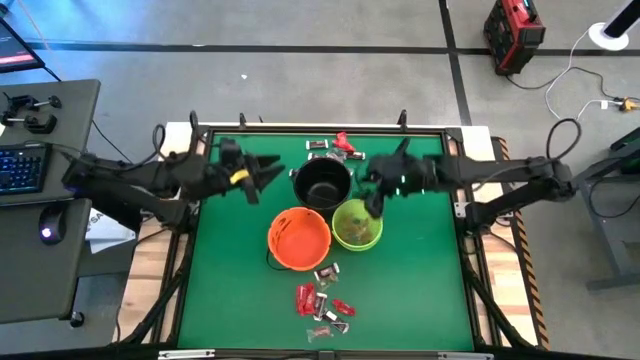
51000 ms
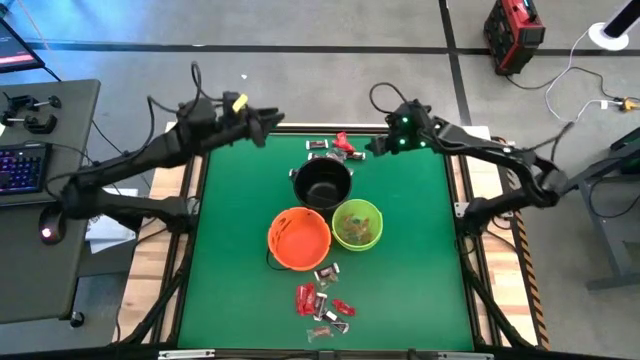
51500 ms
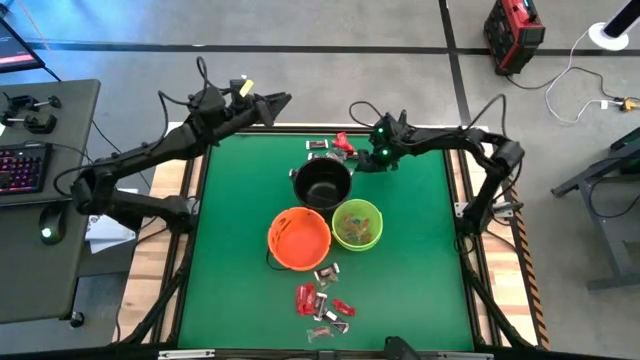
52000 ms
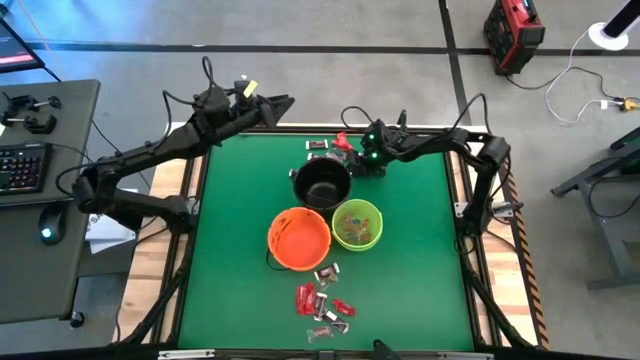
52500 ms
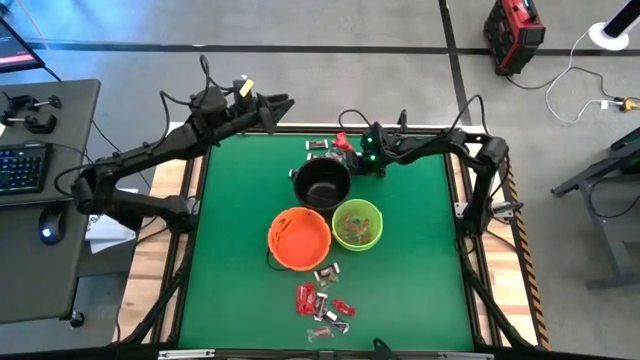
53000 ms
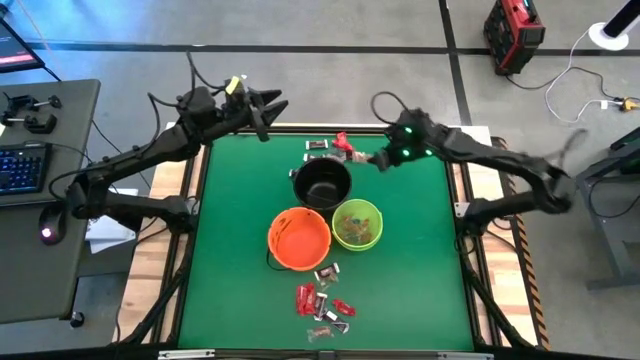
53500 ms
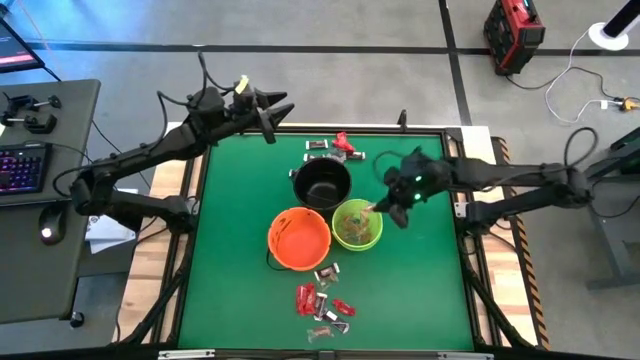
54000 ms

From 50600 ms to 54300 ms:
Task: Sort candy by brand, put in halloween buckets
Put the orange gummy into the green bucket

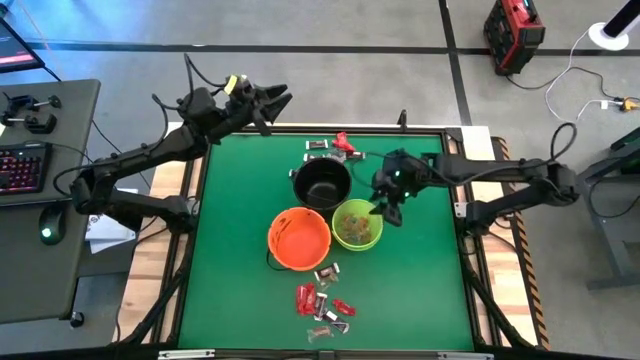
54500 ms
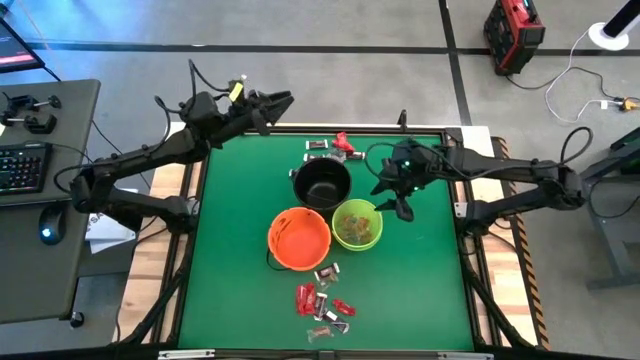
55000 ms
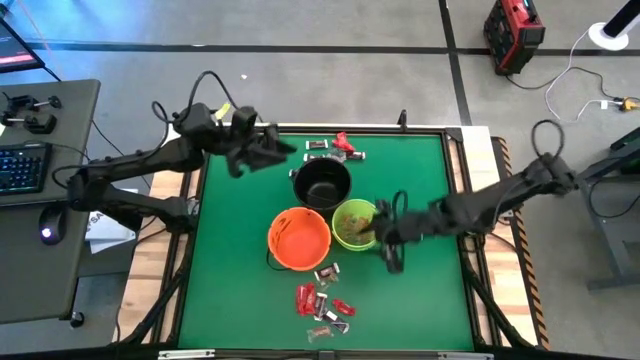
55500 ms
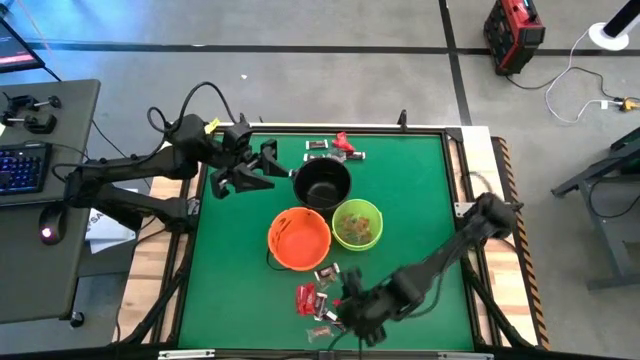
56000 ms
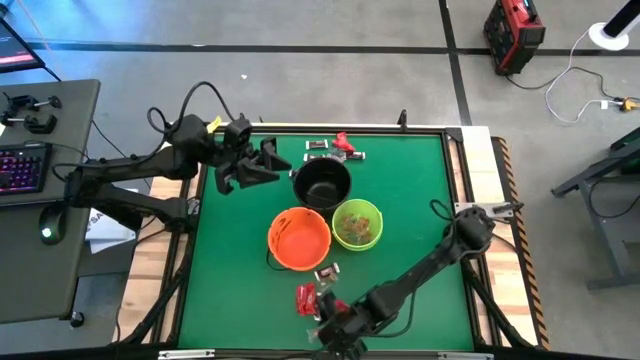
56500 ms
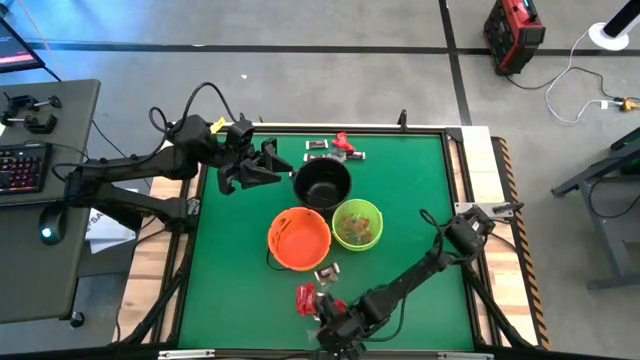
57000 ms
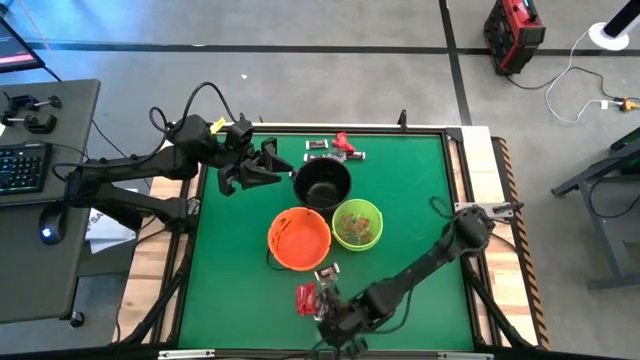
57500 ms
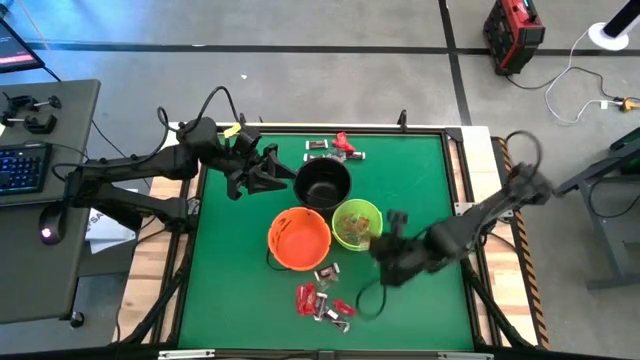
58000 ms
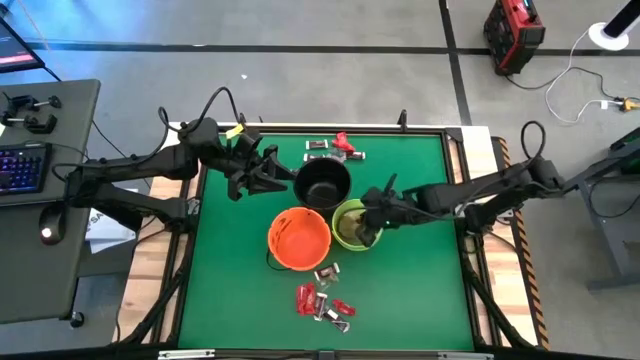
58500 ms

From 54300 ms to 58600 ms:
Put the orange gummy into the green bucket

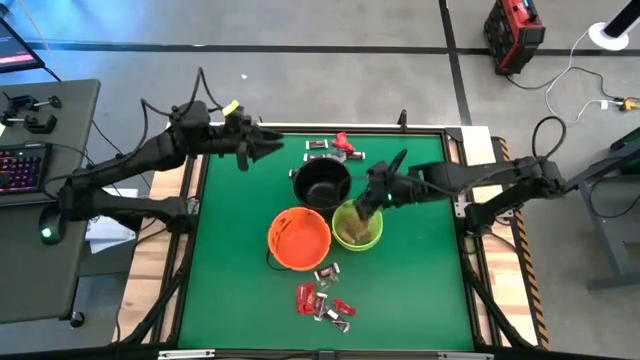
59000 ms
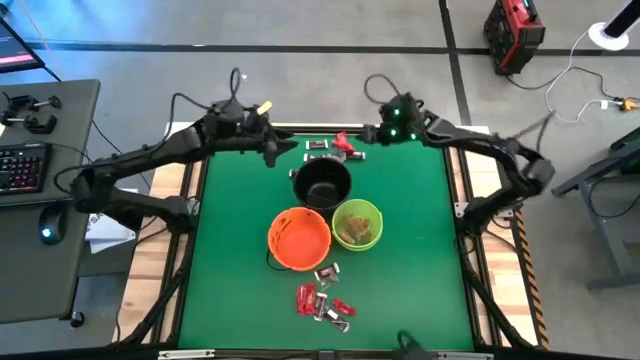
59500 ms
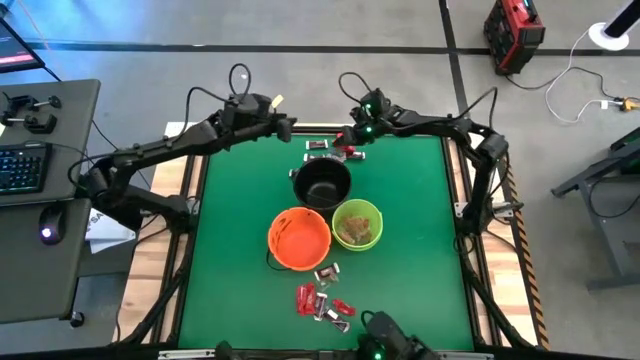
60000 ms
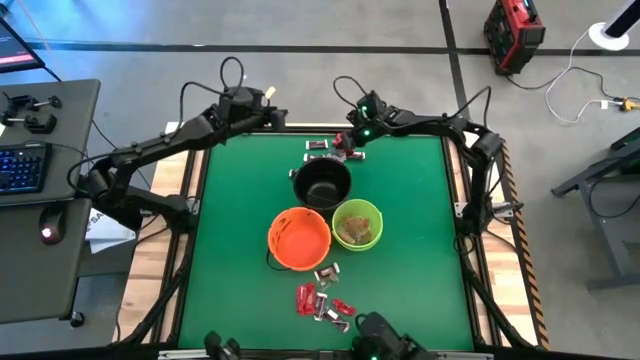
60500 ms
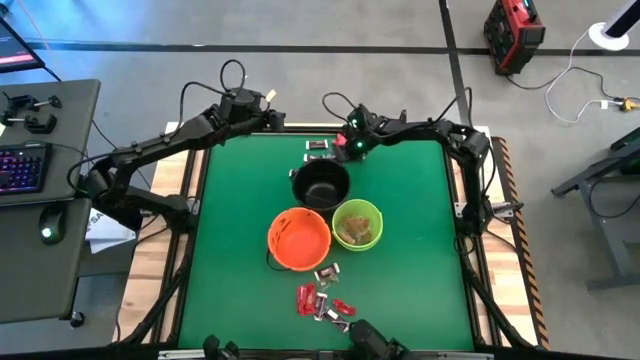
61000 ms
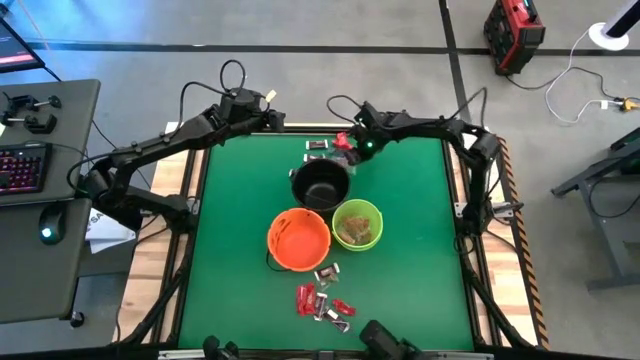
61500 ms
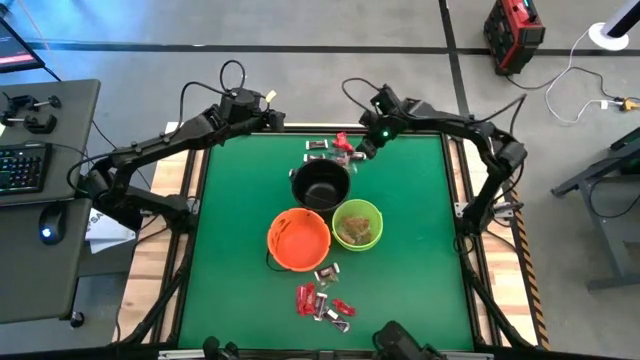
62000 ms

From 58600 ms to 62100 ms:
Put the green gummy into the green bucket

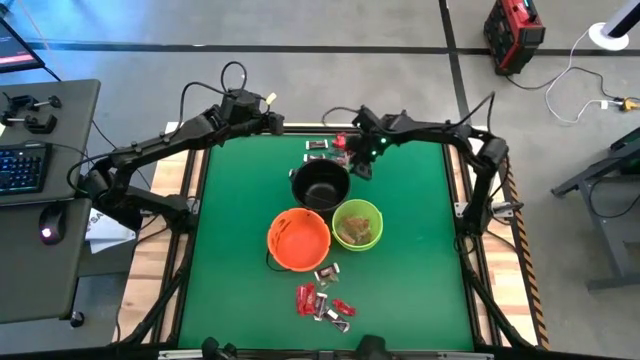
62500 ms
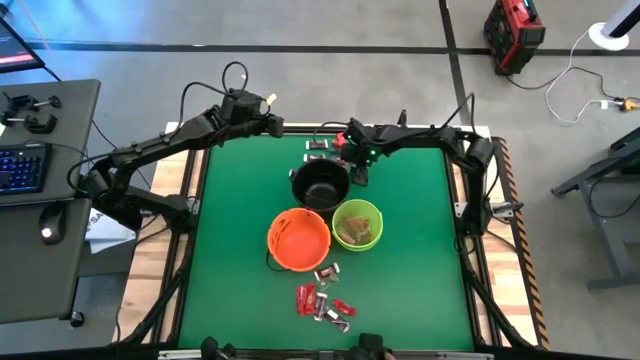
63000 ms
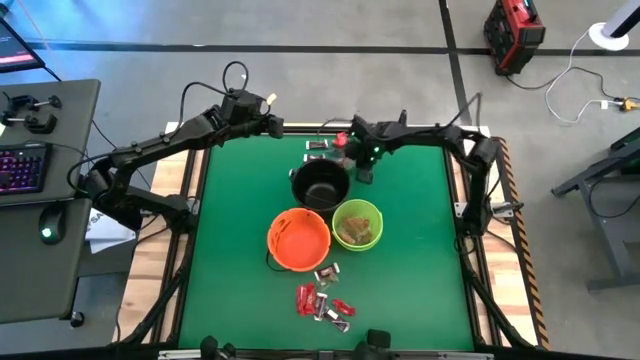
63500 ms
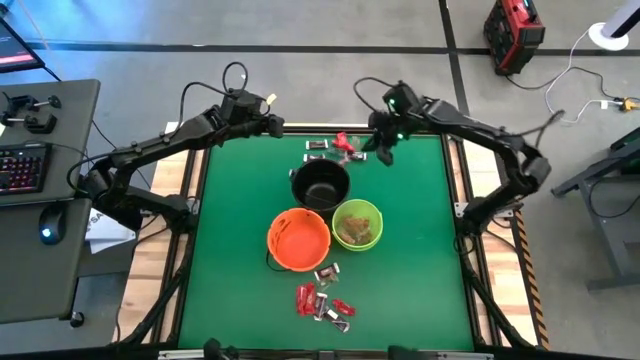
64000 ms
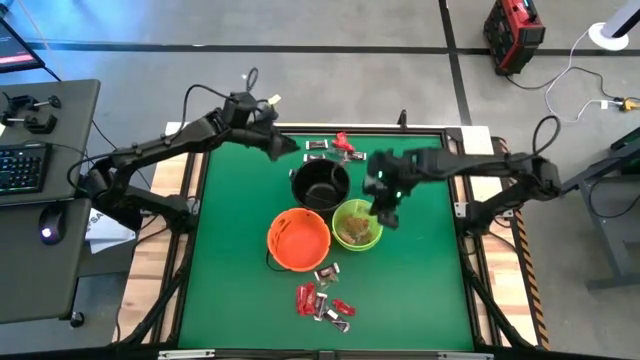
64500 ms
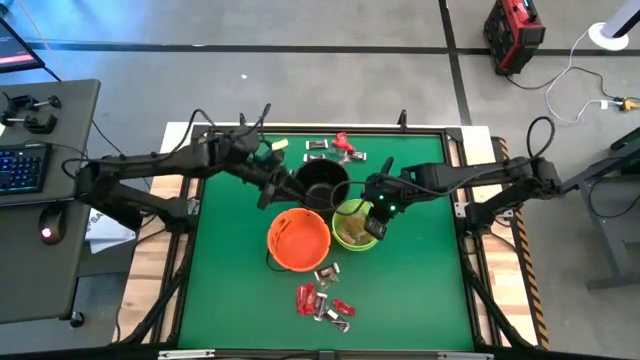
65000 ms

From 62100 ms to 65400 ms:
Put the green gummy into the green bucket

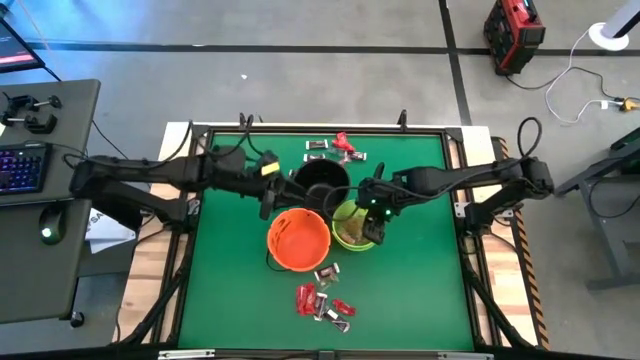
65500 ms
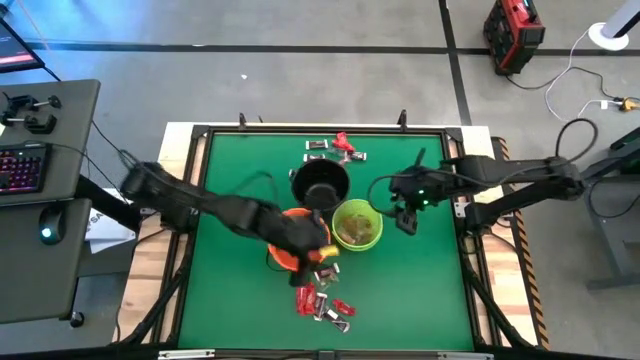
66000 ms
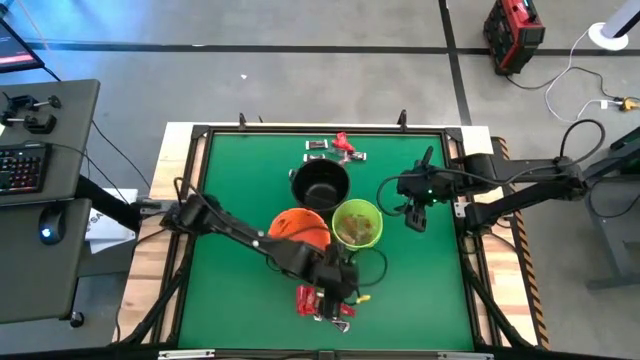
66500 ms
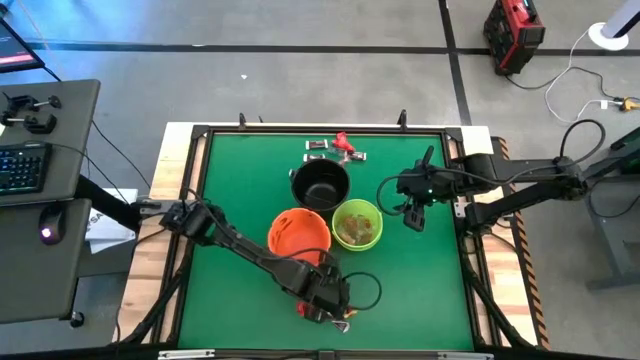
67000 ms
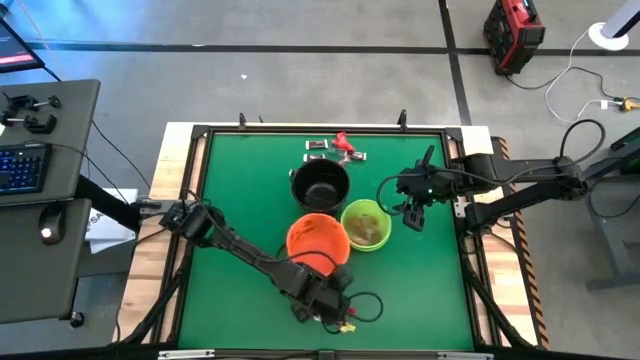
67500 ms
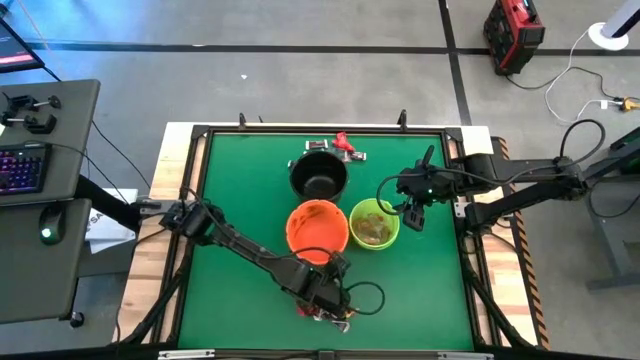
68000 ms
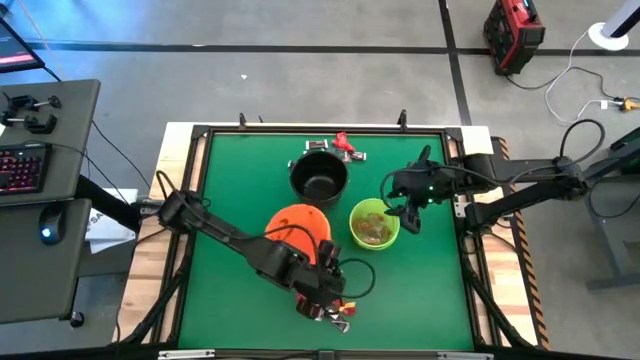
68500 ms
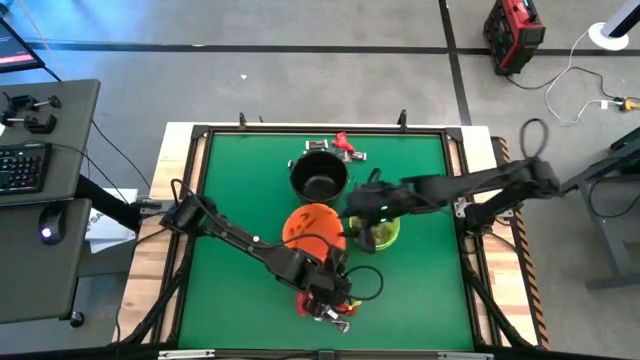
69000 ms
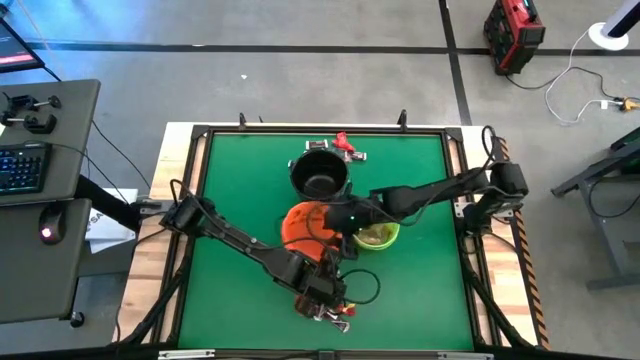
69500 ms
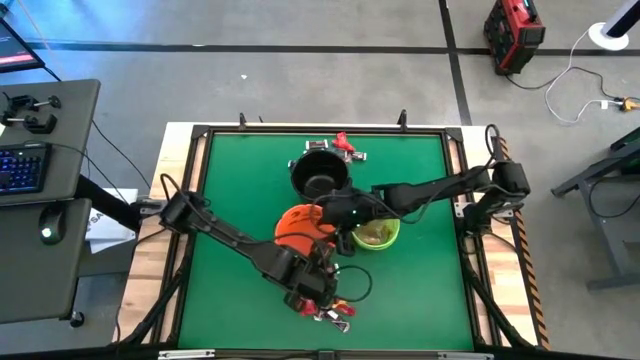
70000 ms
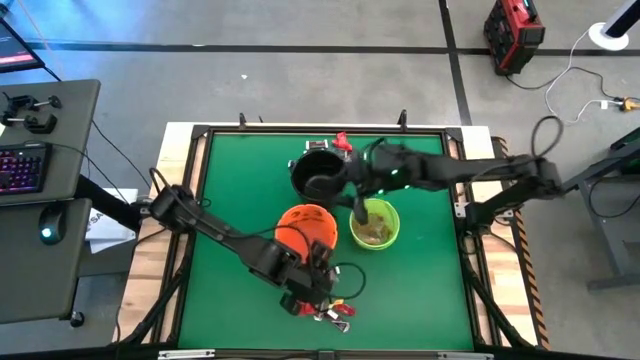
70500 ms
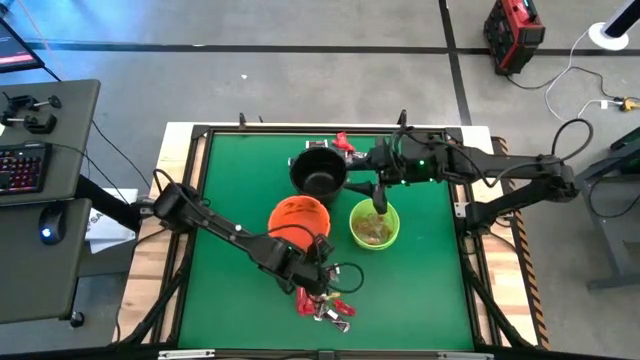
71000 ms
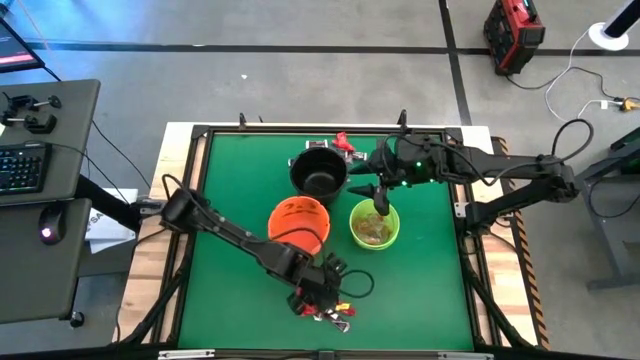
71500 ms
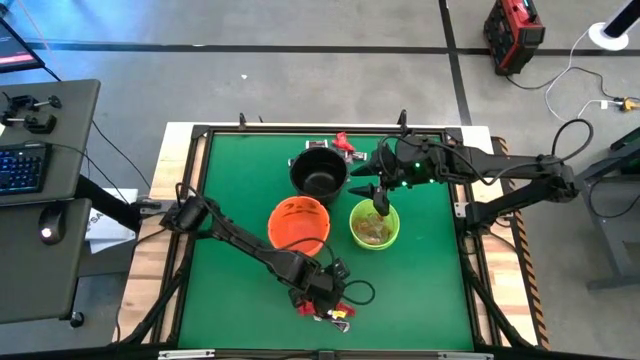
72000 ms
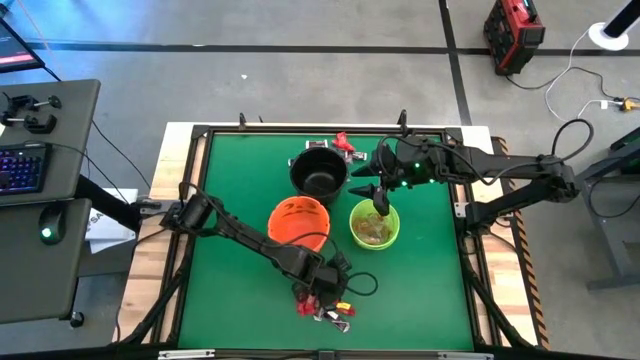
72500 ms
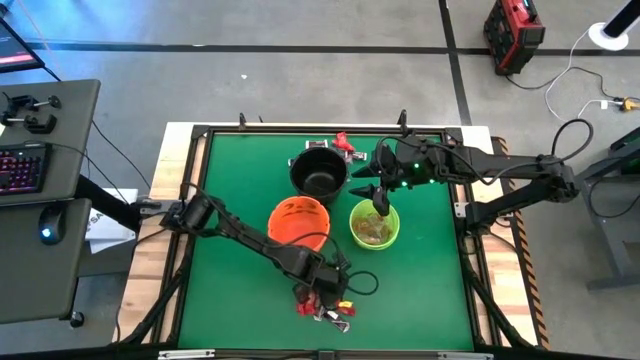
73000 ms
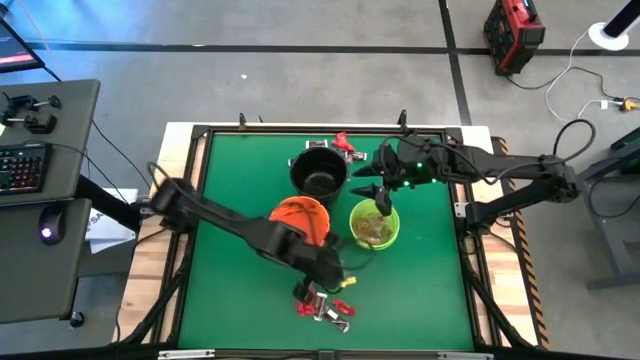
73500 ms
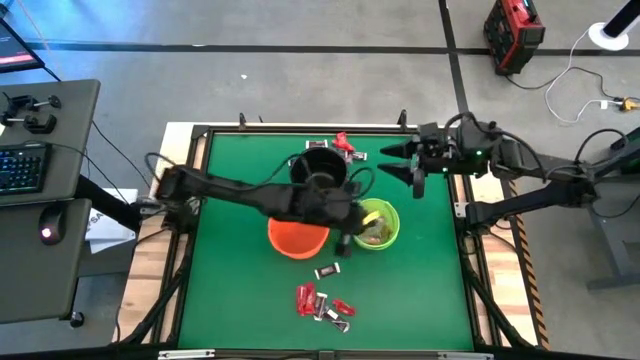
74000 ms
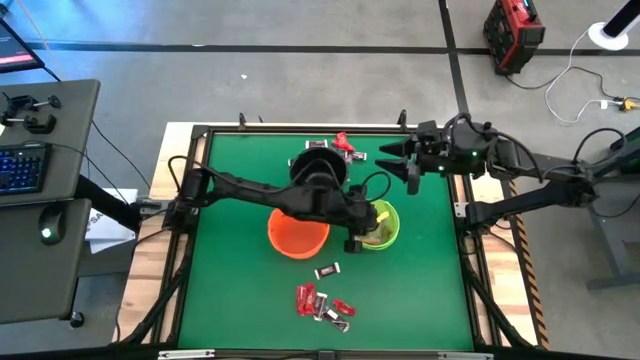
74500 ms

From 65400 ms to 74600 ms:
Put the green gummy into the green bucket
